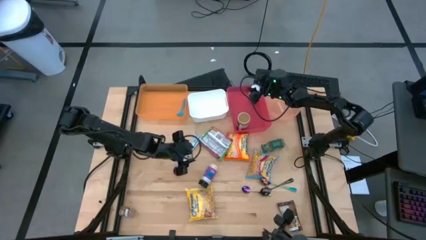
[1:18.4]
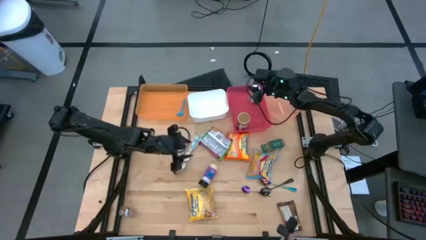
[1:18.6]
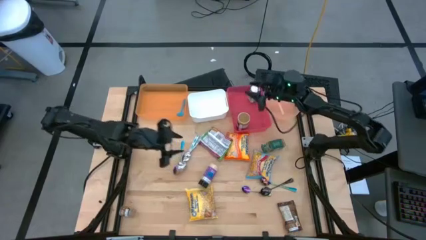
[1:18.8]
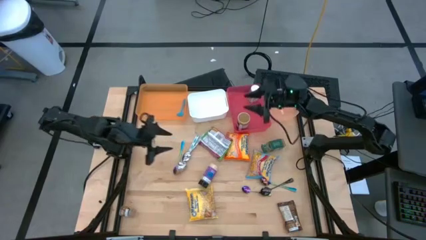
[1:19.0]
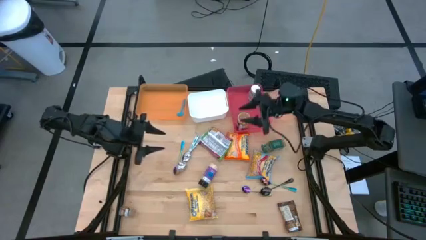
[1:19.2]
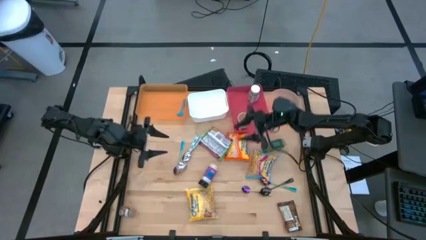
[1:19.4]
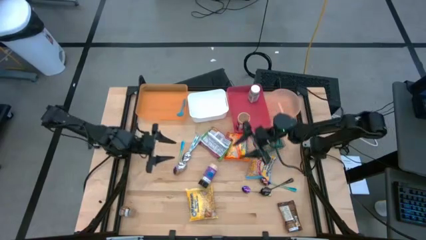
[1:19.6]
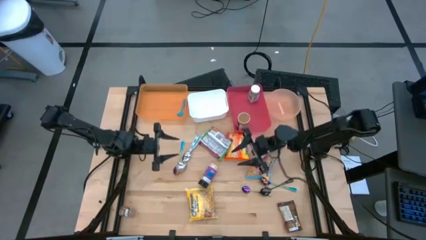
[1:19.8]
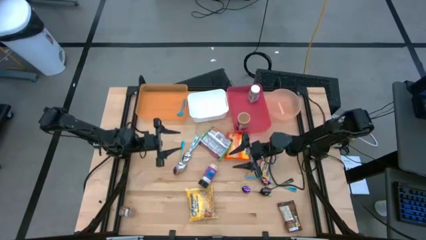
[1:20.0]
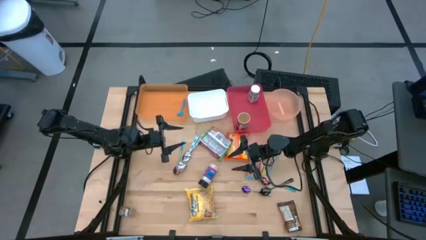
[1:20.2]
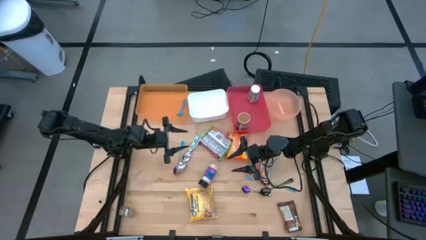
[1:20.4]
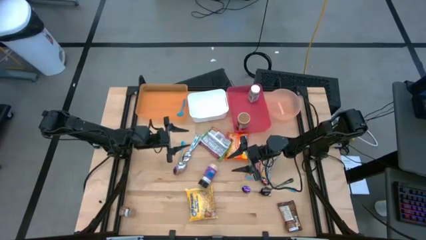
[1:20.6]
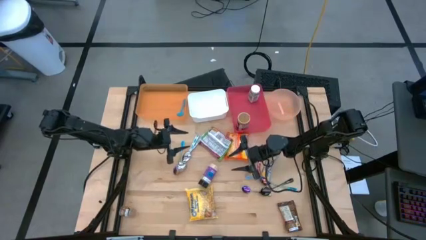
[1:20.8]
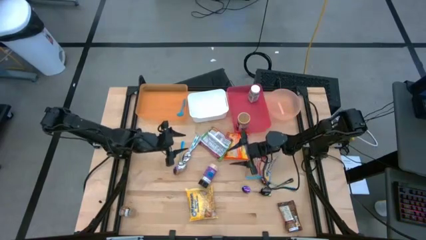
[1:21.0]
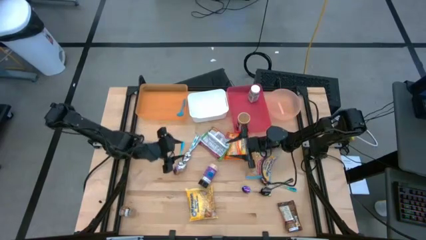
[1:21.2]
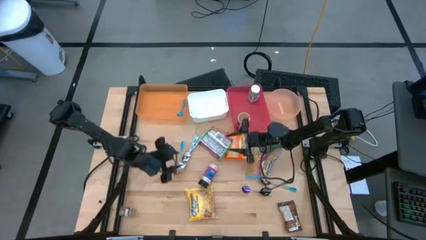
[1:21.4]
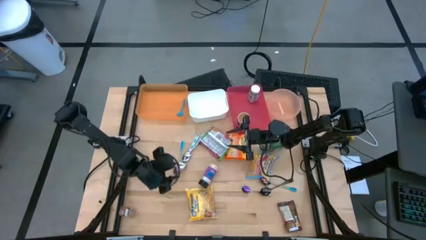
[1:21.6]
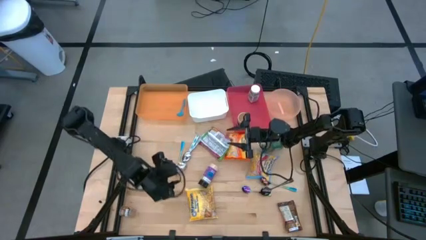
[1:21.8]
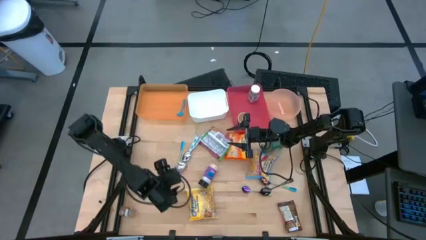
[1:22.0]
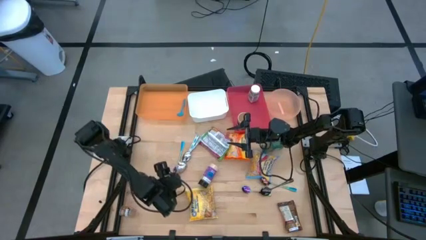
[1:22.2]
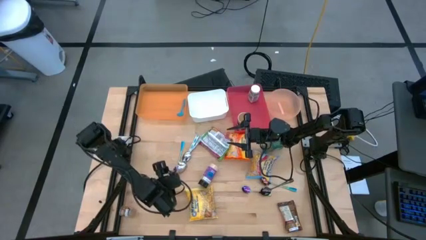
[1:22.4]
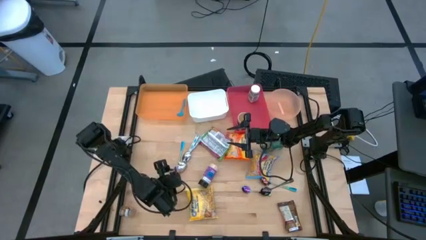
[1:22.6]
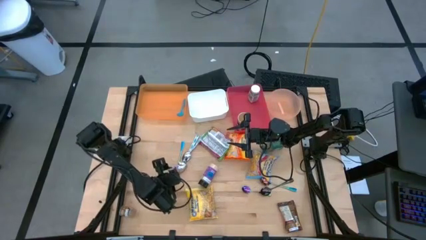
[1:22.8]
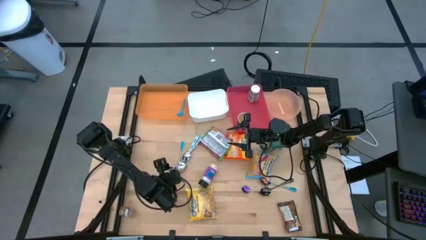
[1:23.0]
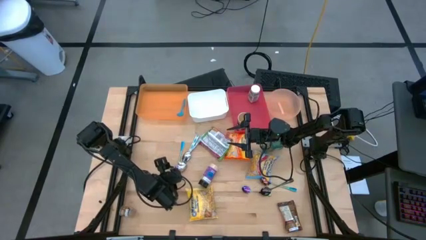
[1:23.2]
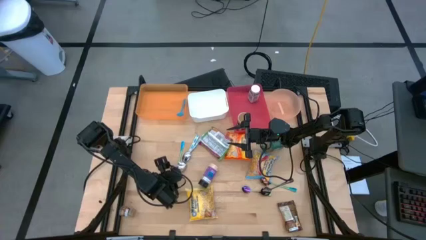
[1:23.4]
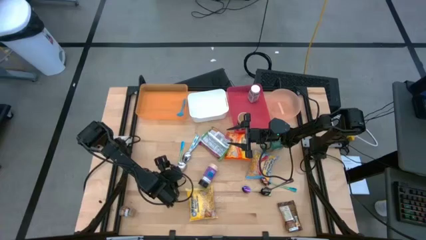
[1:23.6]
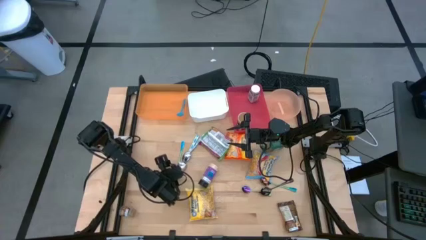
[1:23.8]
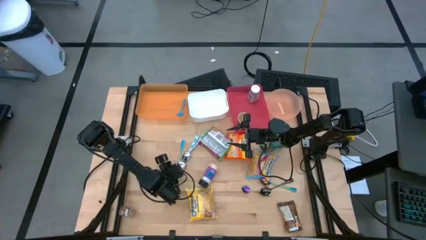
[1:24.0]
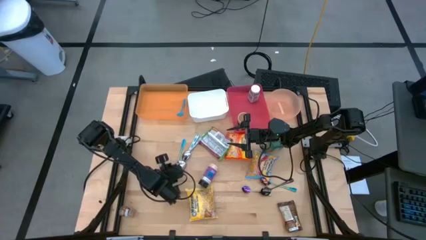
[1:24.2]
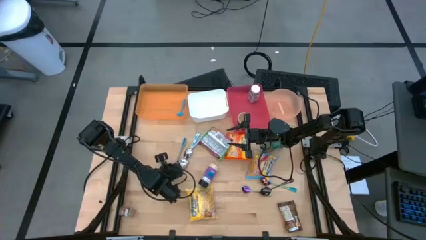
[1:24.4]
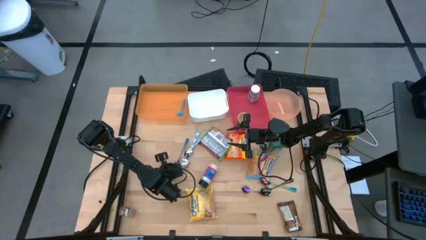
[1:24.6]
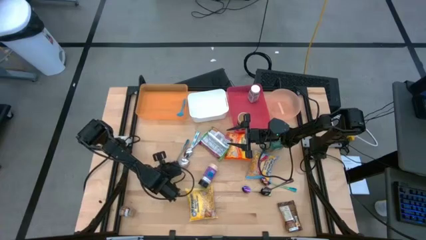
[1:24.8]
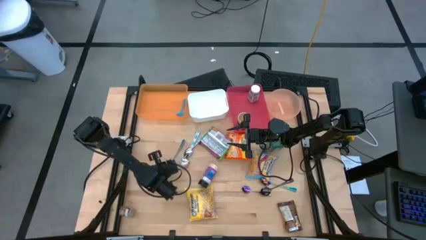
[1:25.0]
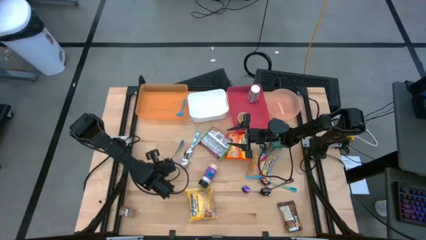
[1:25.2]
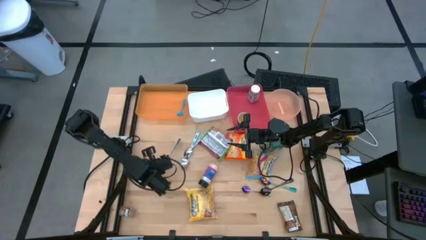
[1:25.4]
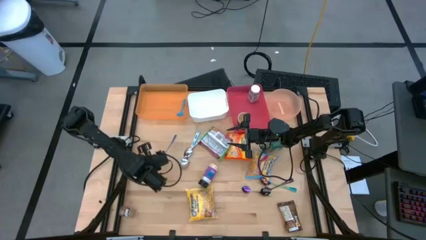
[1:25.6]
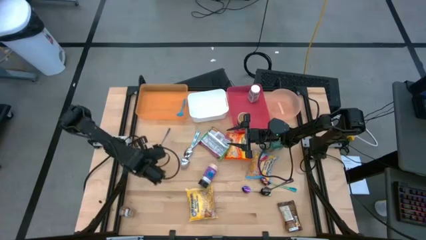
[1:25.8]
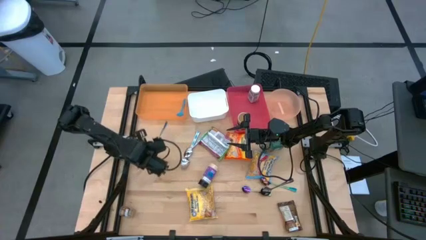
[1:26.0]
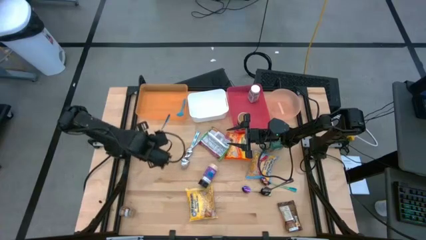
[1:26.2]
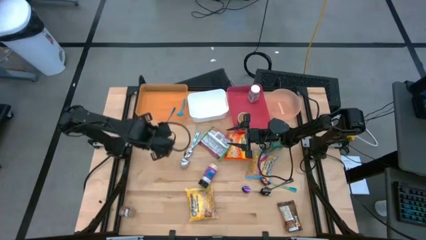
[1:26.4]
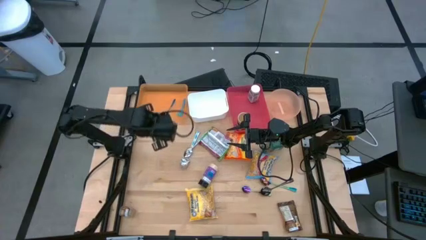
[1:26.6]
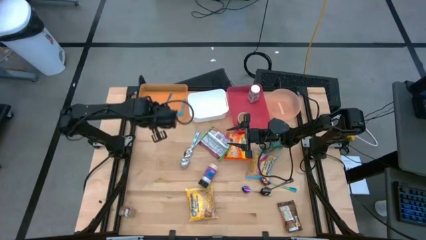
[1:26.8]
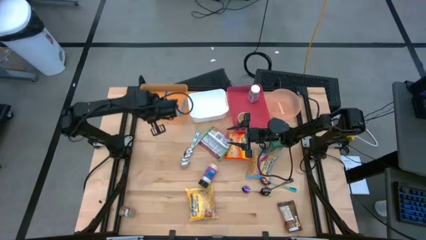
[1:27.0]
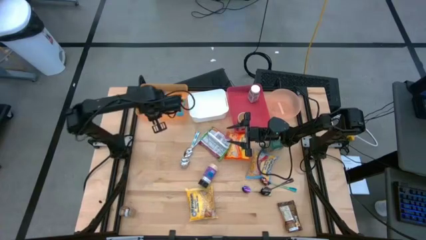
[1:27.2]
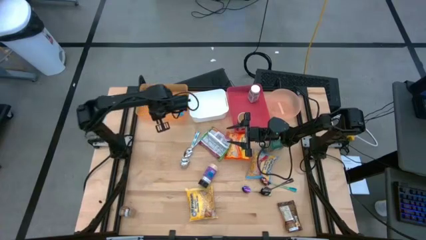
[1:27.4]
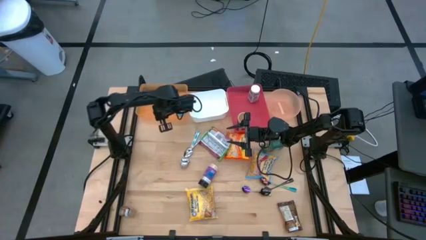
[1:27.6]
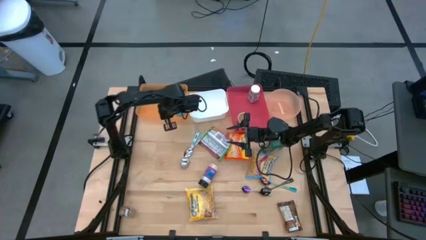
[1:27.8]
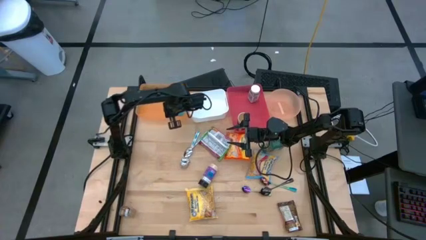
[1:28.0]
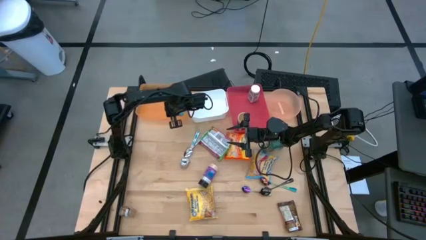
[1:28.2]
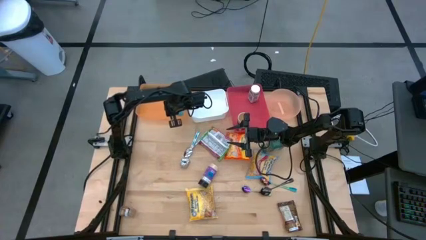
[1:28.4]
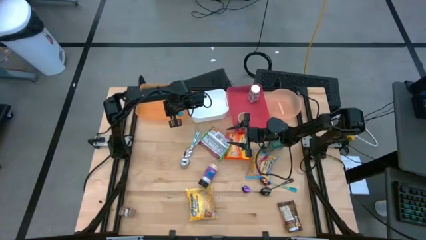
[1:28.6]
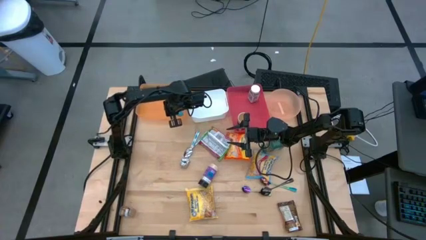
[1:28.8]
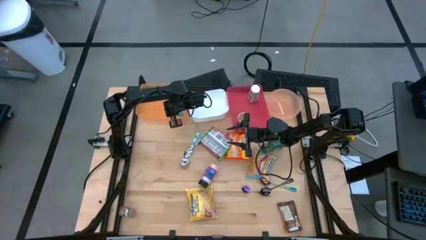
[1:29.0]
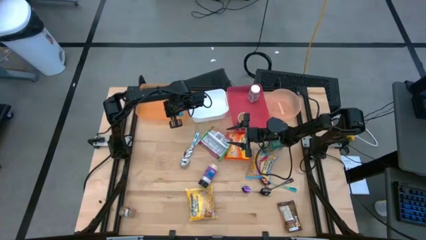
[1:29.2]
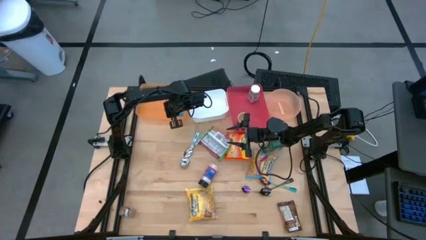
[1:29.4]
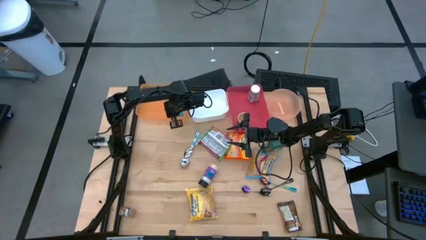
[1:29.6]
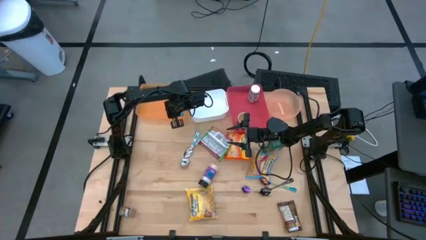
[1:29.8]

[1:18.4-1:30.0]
Task: Pick & Place Food Item
Put the top left purple spoon into the orange bin
